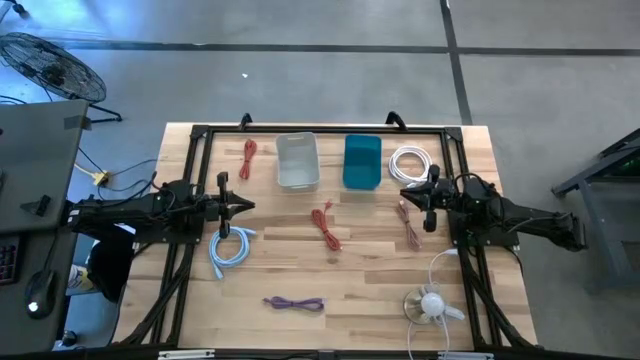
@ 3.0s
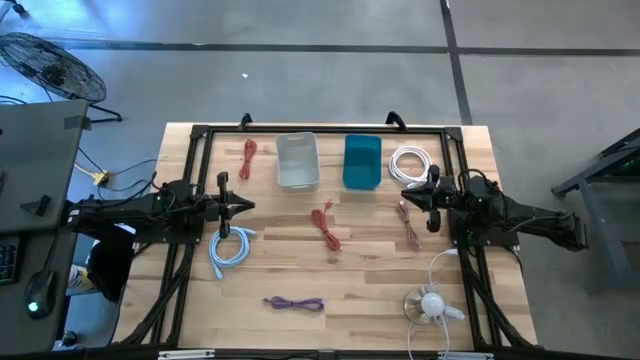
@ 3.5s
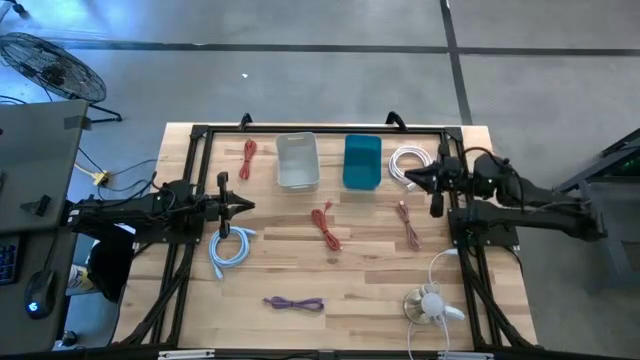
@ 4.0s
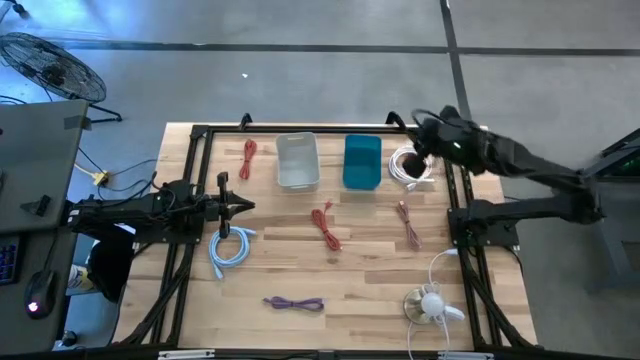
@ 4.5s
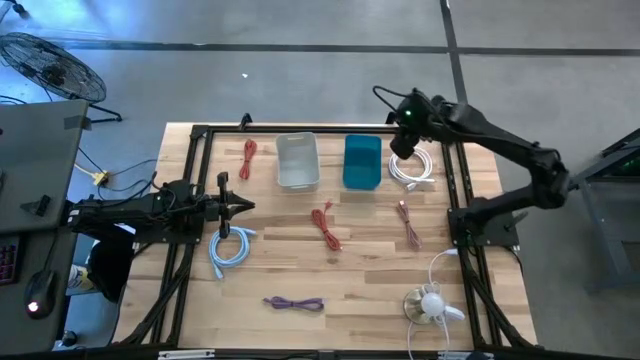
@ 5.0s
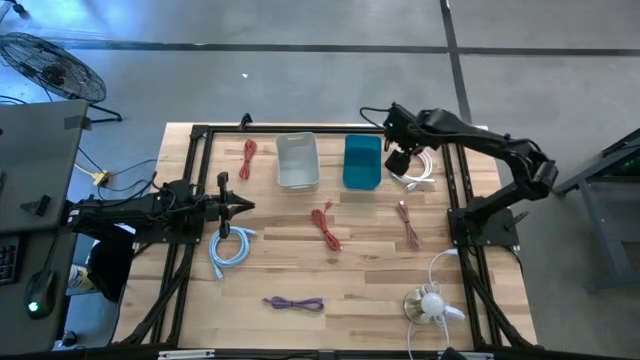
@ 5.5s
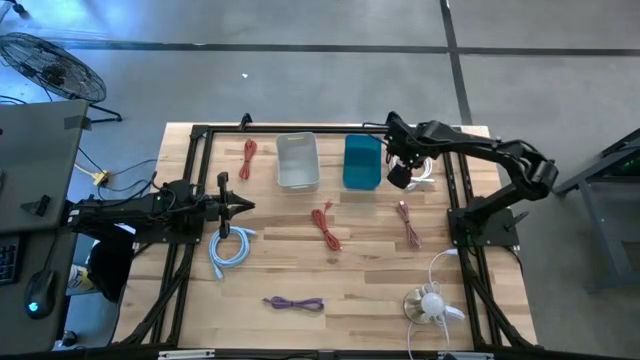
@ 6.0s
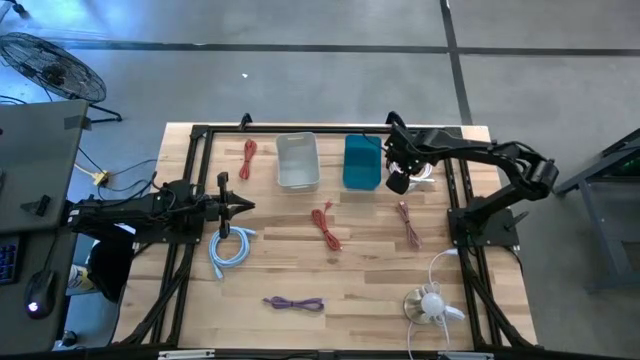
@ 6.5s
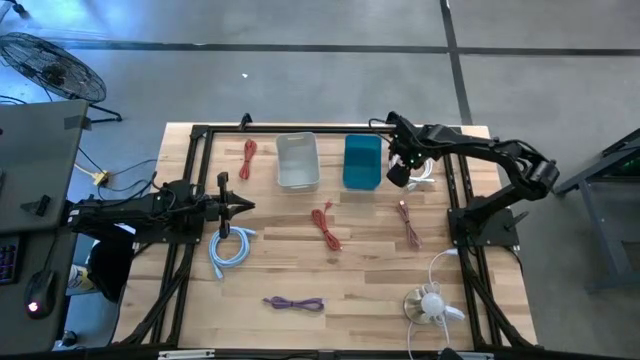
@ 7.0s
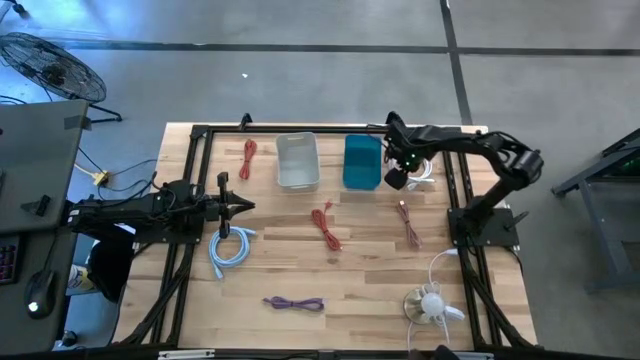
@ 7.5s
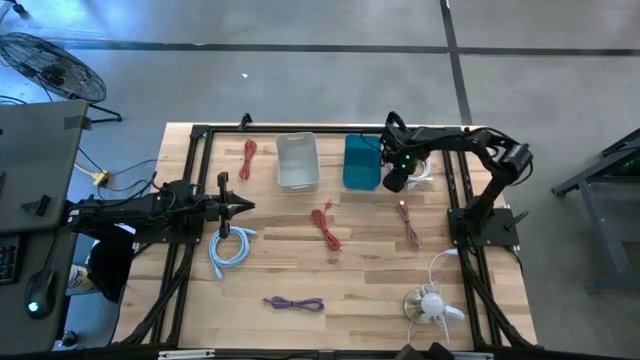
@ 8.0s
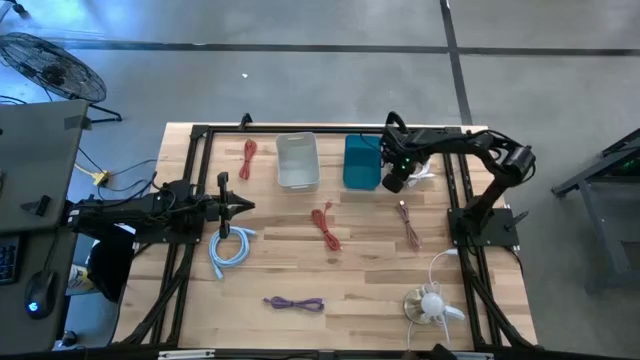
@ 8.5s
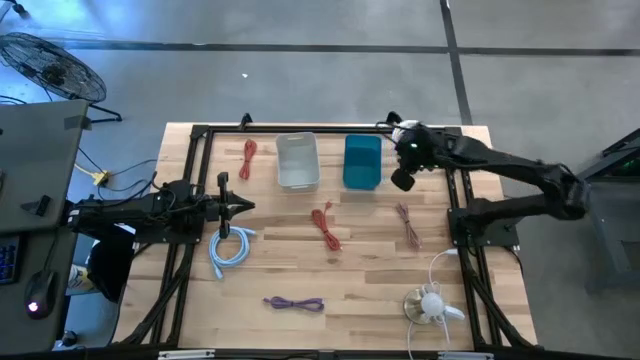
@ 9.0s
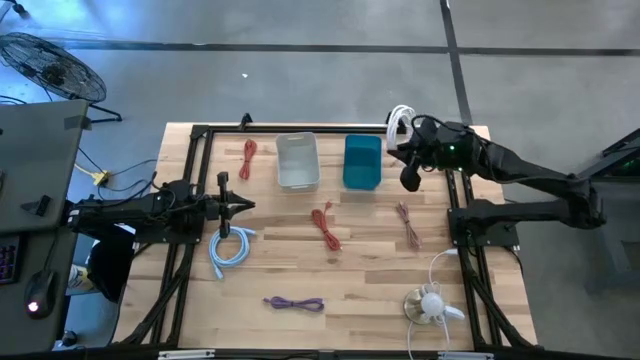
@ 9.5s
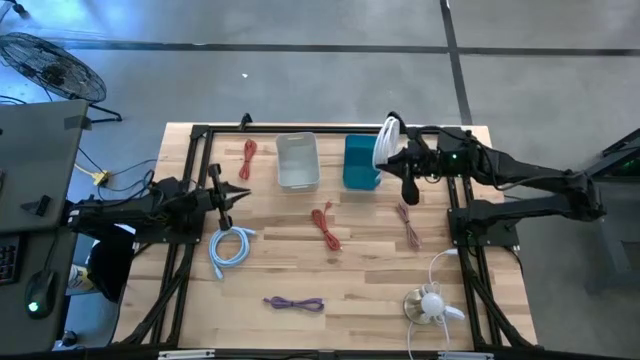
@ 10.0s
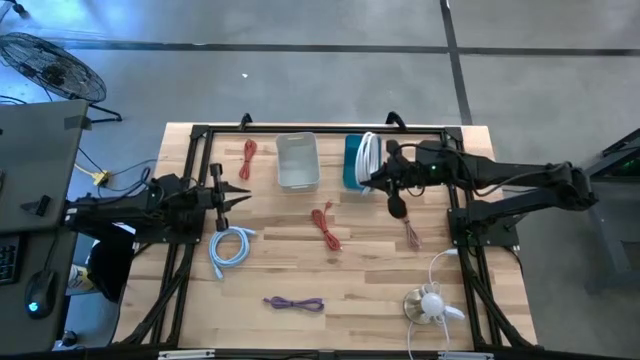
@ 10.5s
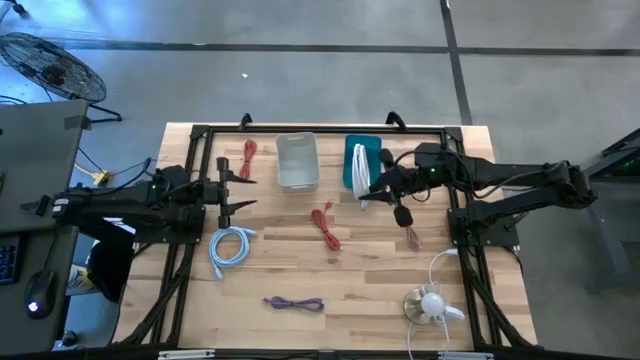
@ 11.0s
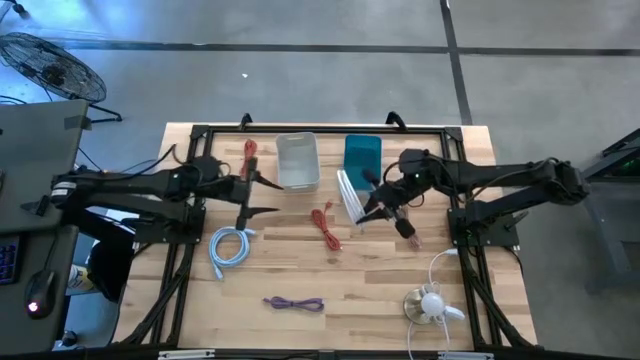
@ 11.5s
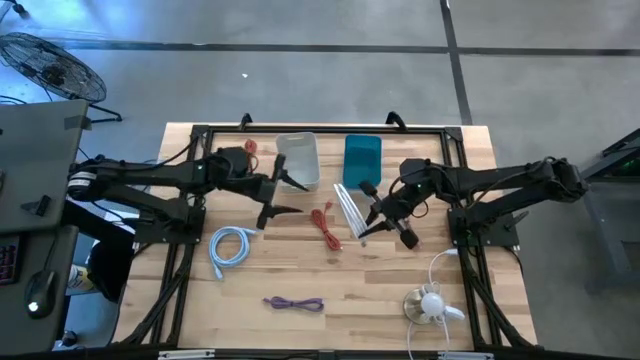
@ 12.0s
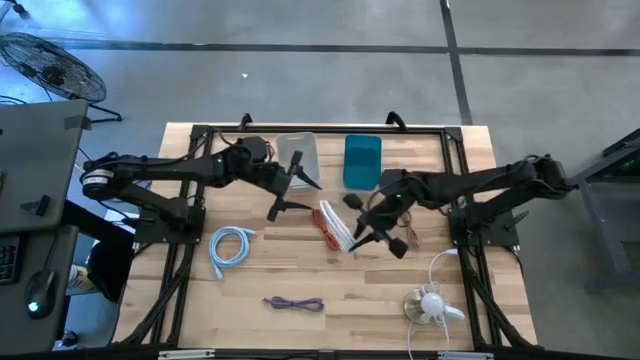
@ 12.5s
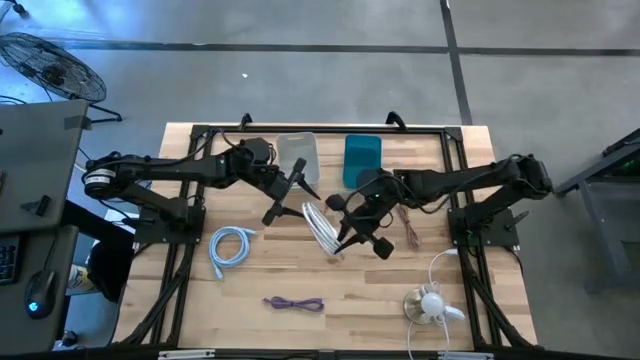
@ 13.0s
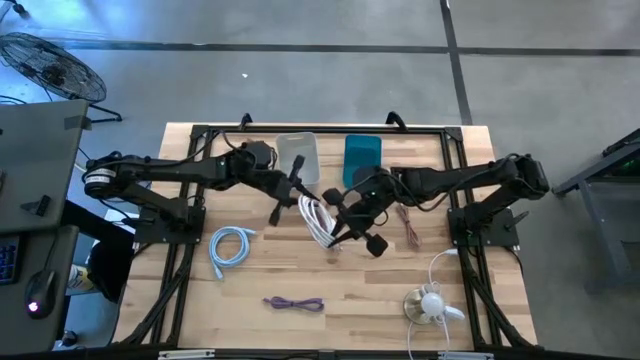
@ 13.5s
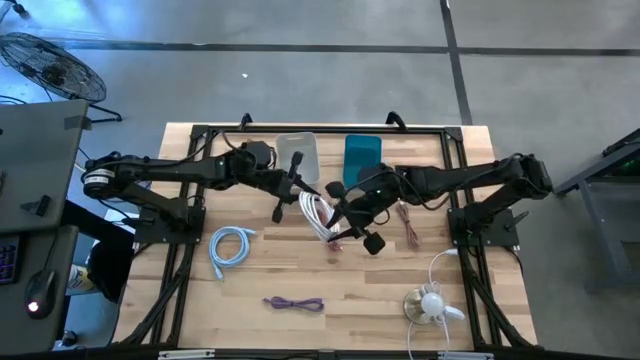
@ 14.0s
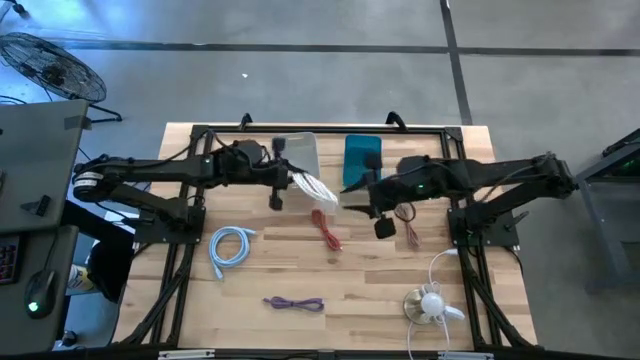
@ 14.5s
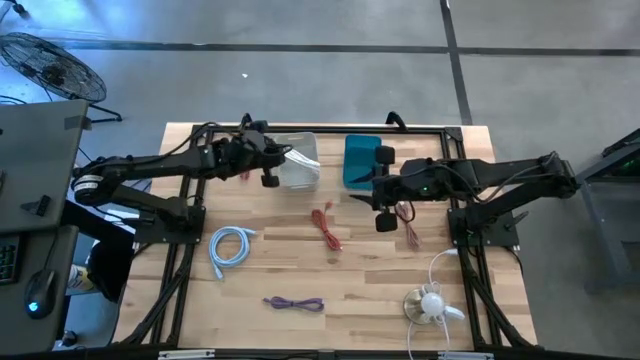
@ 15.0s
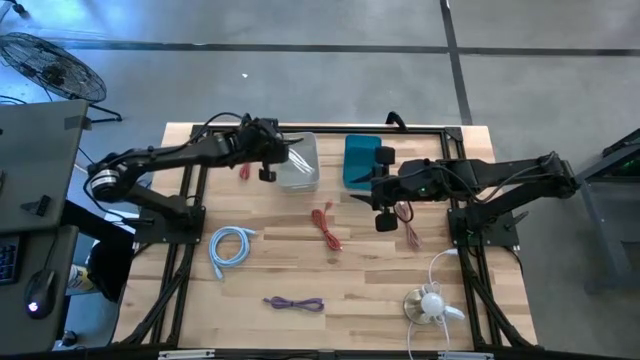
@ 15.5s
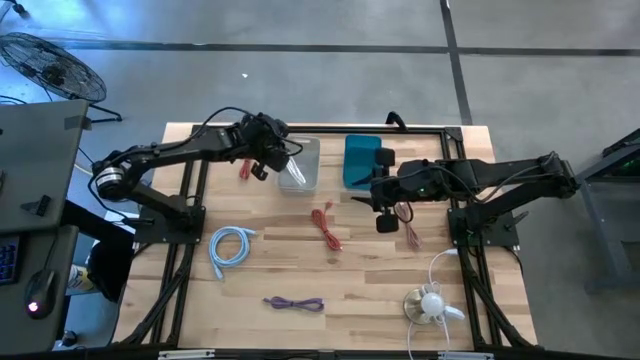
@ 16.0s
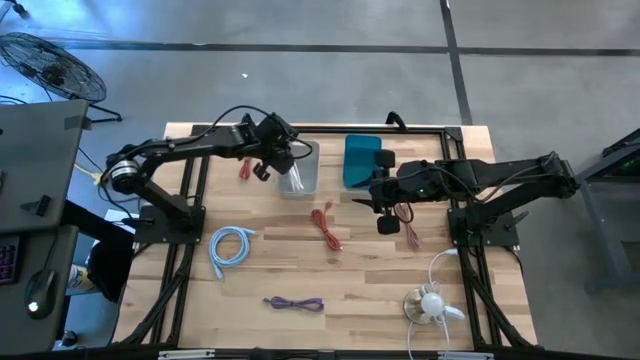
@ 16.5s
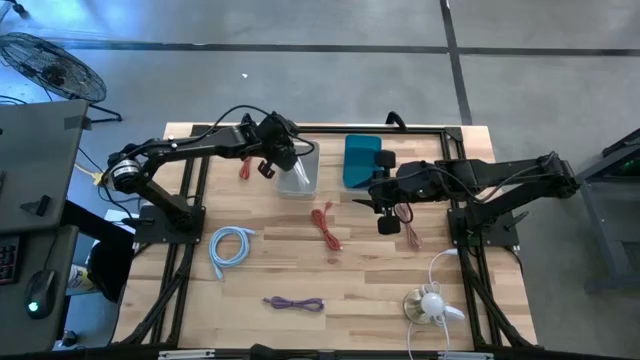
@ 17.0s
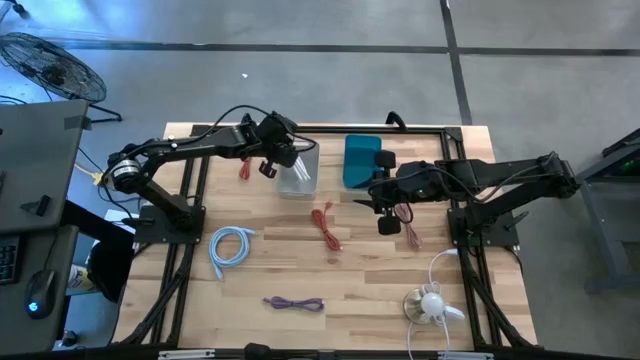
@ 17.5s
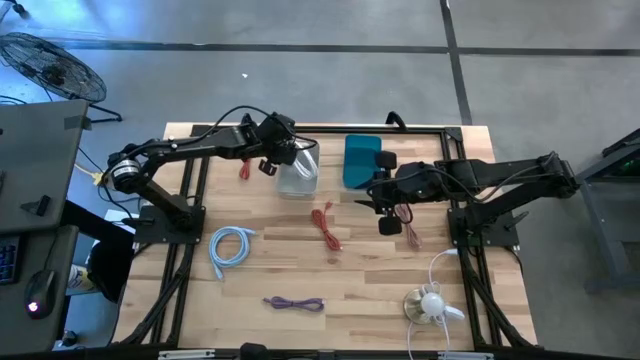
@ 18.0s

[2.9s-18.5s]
Task: Pick & Place USB Port
Put the white HDMI cable into the gray bin

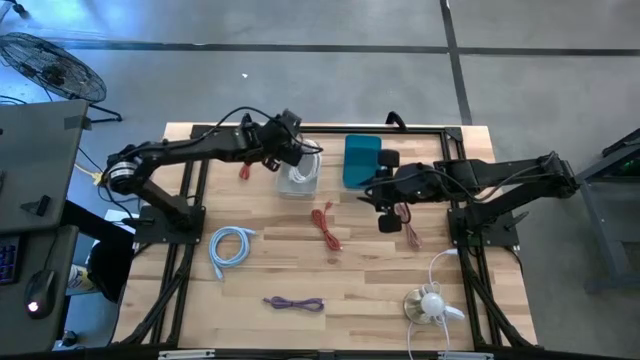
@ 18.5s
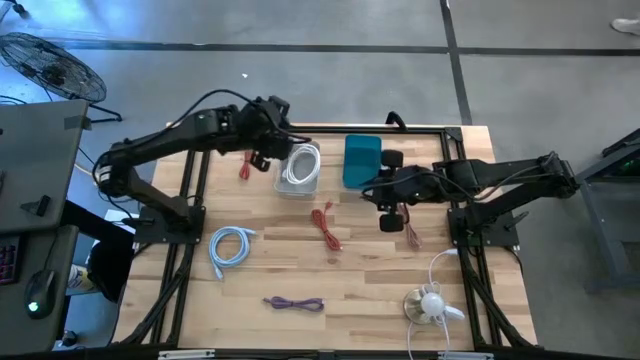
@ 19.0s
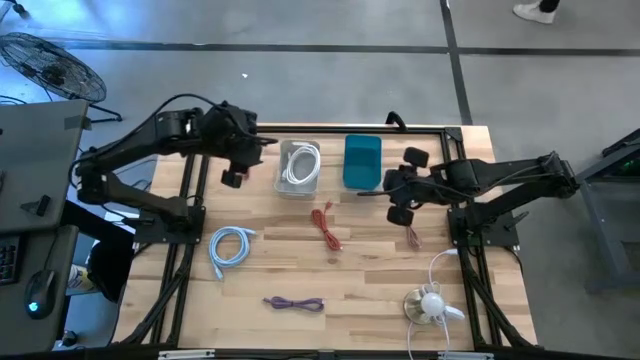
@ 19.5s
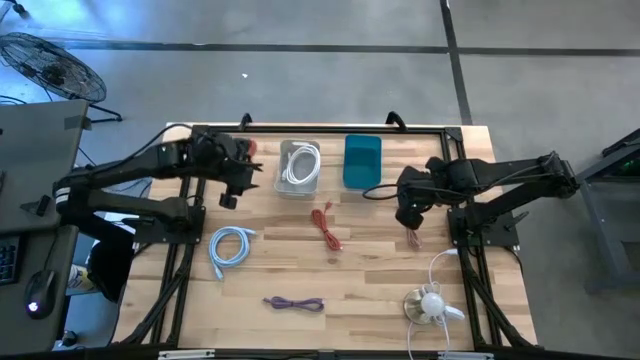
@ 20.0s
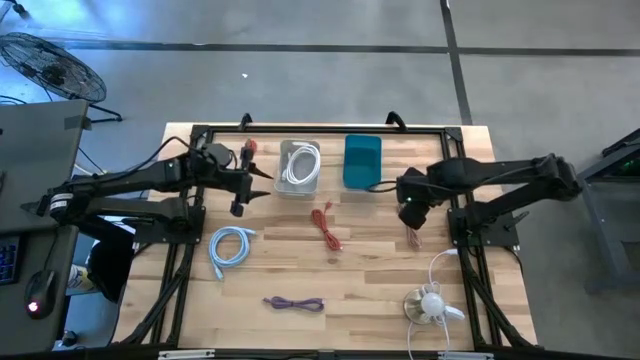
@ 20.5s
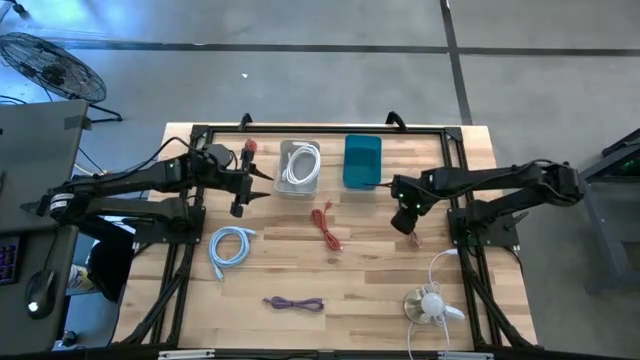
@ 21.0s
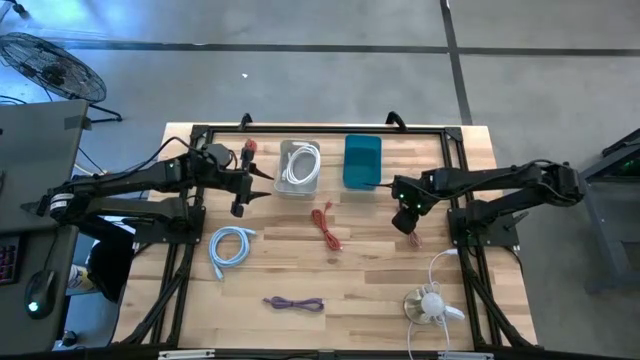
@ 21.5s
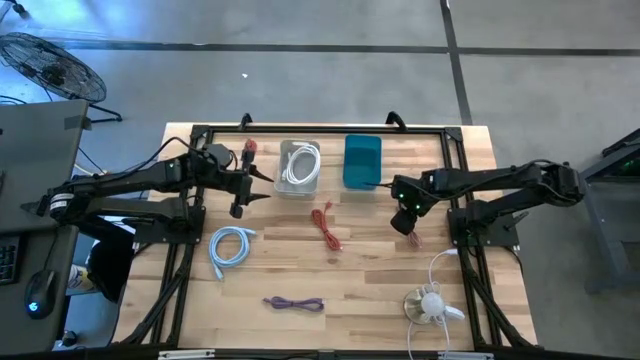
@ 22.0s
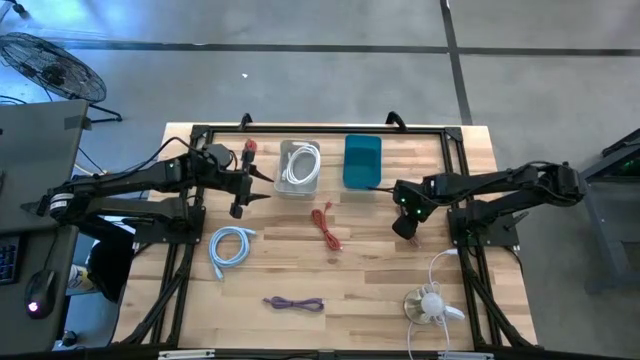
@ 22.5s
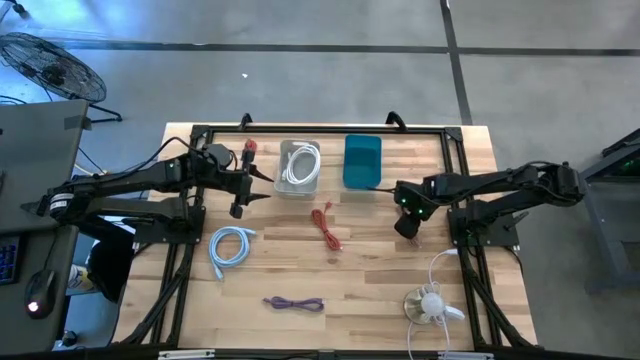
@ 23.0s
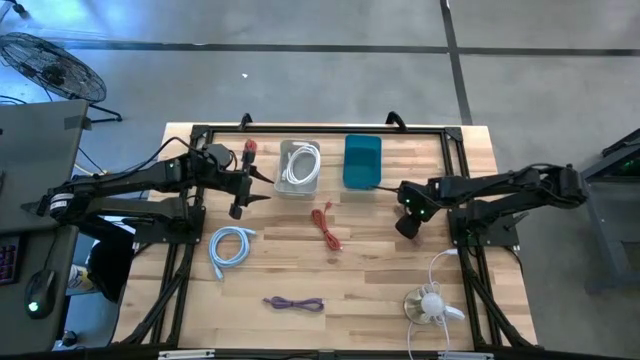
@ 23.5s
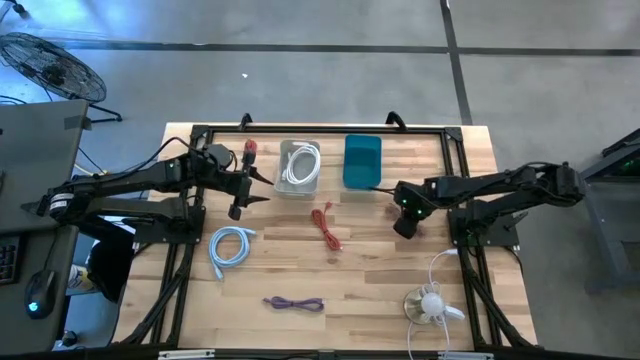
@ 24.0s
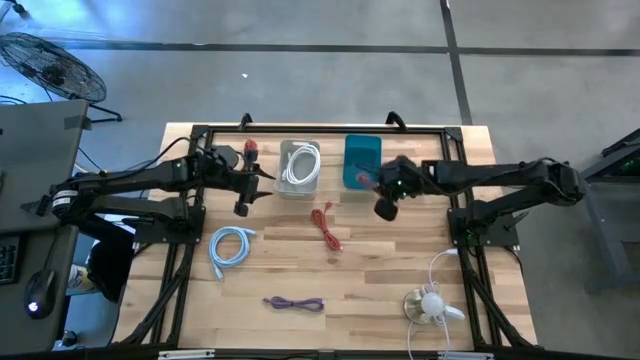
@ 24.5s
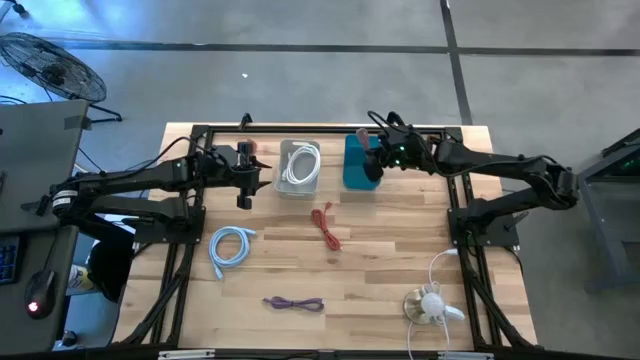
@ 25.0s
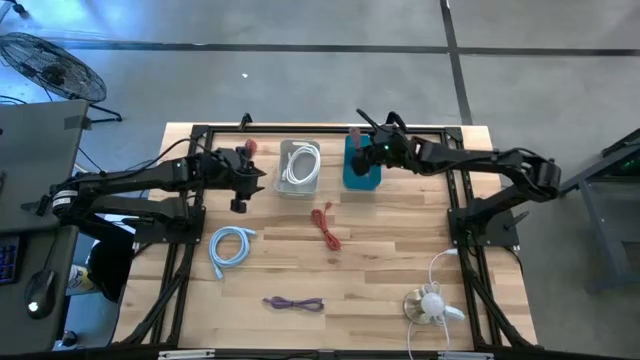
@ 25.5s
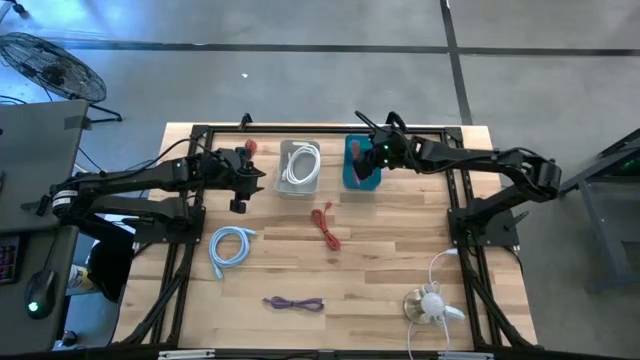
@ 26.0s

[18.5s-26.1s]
Put the pink charger cable into the blue bin
